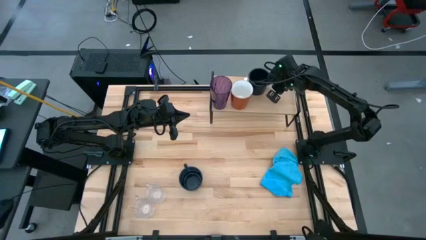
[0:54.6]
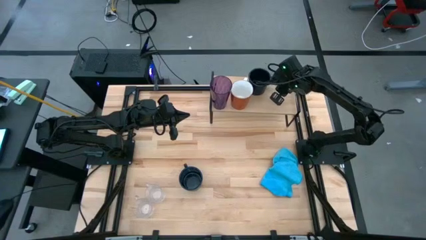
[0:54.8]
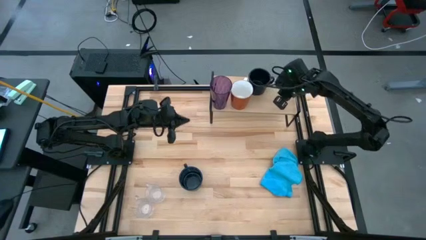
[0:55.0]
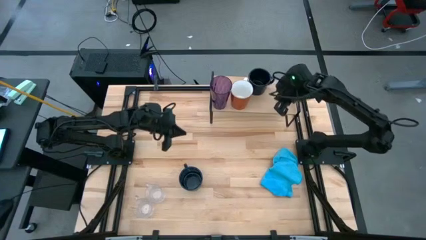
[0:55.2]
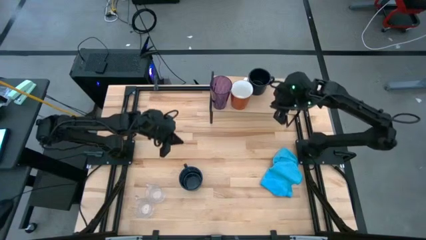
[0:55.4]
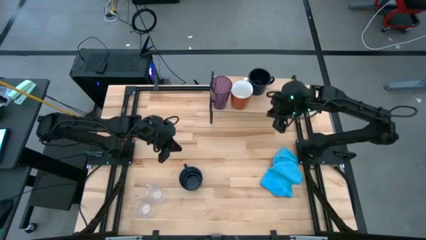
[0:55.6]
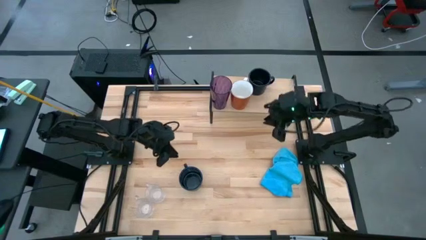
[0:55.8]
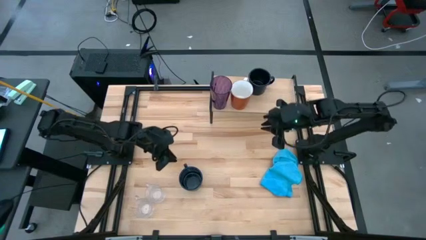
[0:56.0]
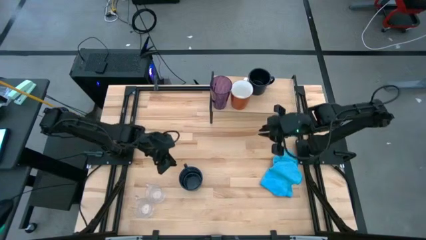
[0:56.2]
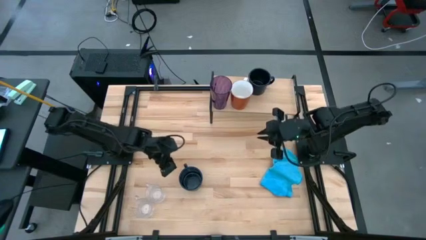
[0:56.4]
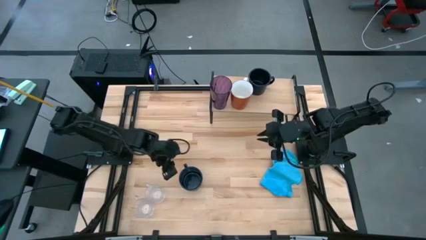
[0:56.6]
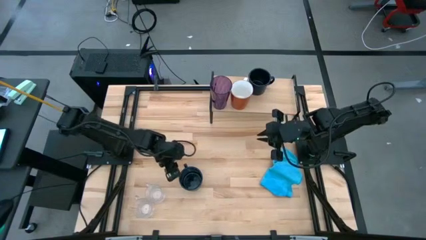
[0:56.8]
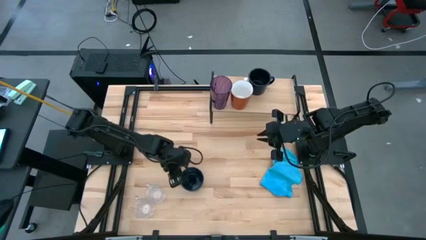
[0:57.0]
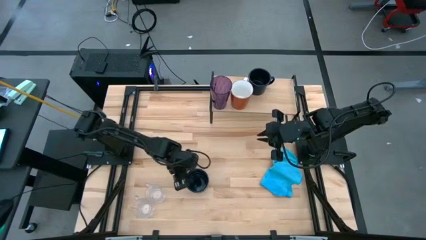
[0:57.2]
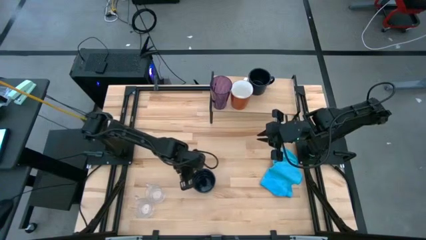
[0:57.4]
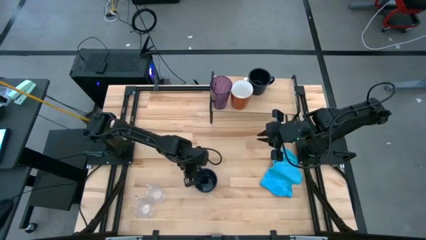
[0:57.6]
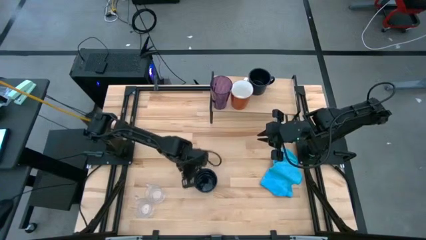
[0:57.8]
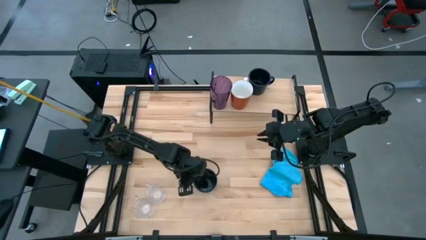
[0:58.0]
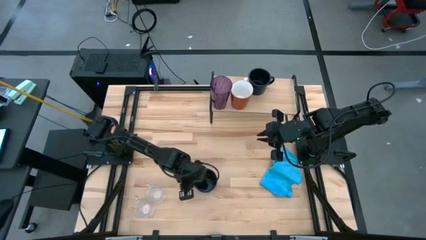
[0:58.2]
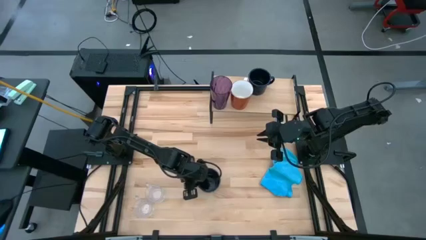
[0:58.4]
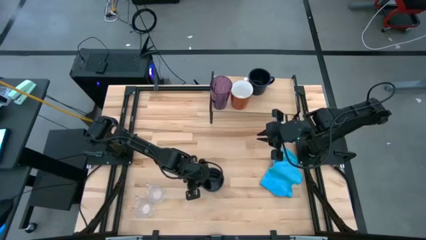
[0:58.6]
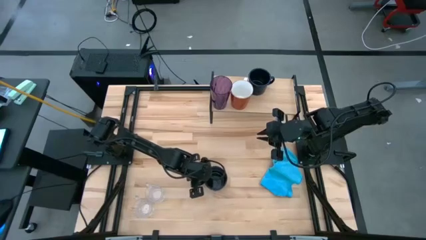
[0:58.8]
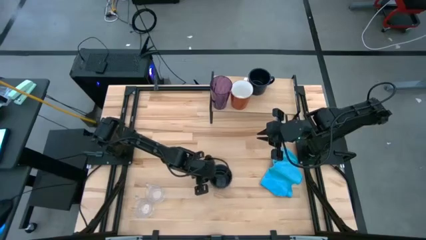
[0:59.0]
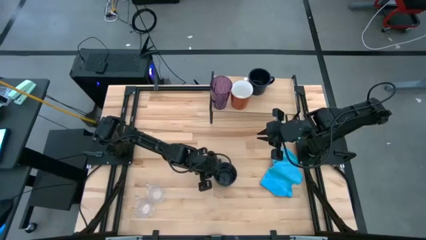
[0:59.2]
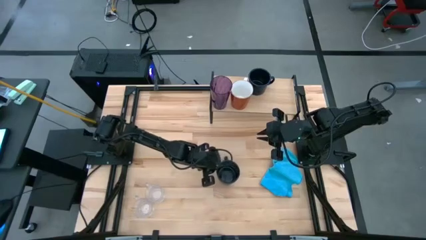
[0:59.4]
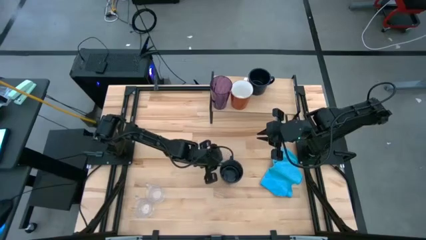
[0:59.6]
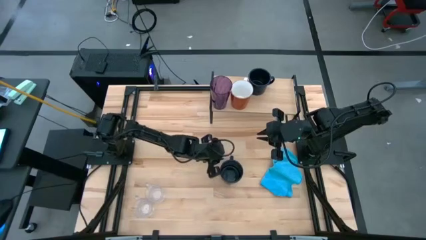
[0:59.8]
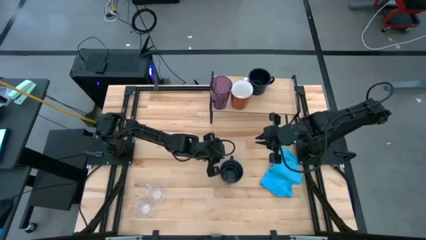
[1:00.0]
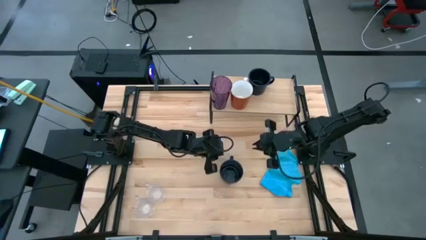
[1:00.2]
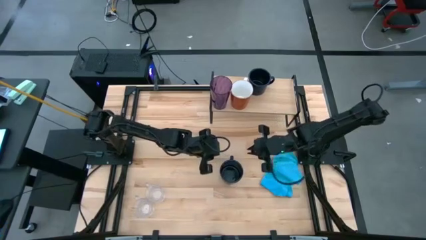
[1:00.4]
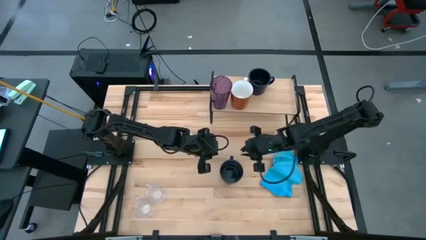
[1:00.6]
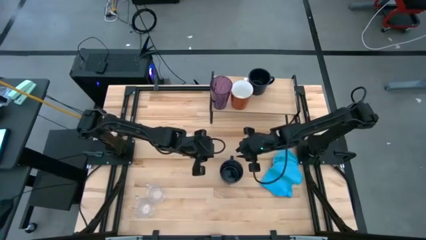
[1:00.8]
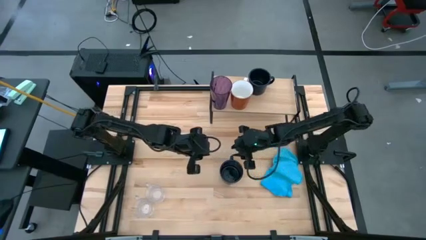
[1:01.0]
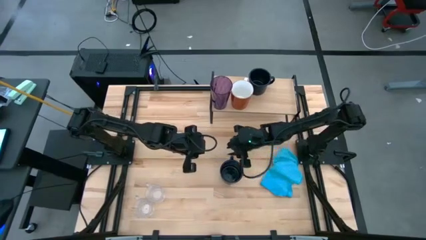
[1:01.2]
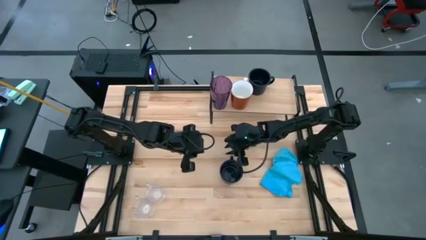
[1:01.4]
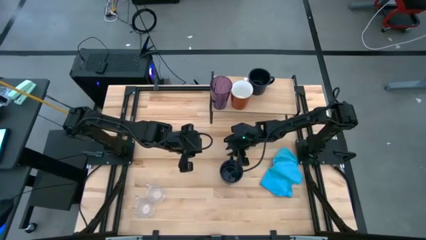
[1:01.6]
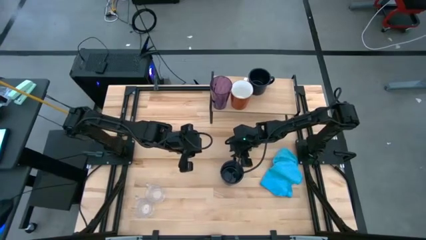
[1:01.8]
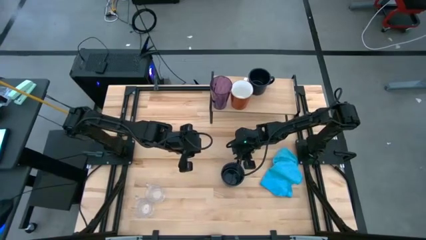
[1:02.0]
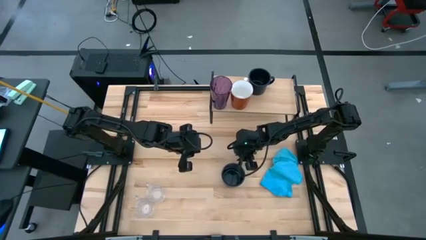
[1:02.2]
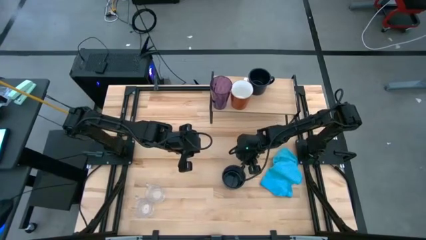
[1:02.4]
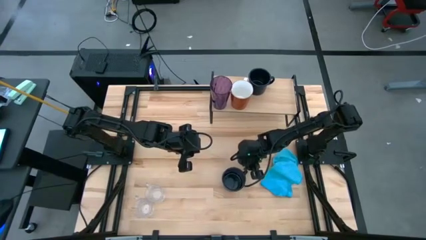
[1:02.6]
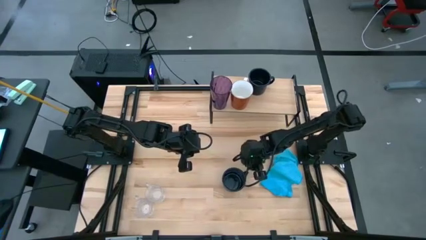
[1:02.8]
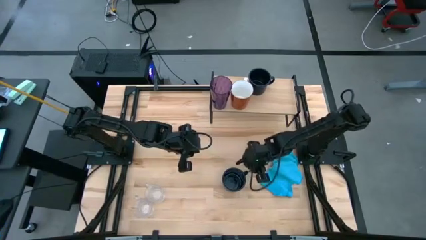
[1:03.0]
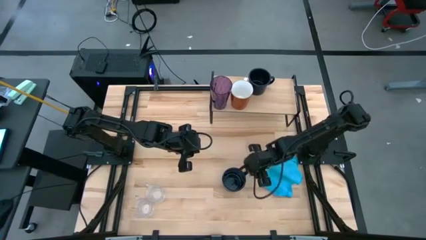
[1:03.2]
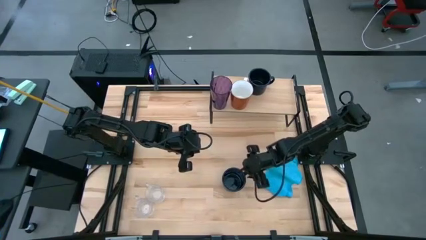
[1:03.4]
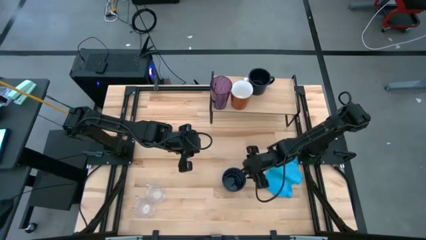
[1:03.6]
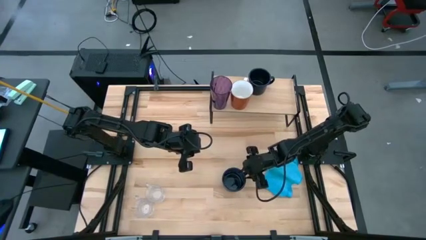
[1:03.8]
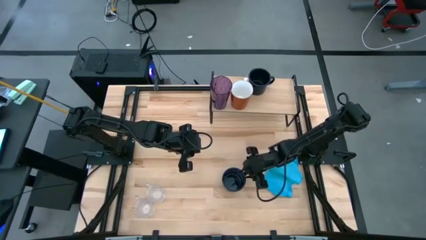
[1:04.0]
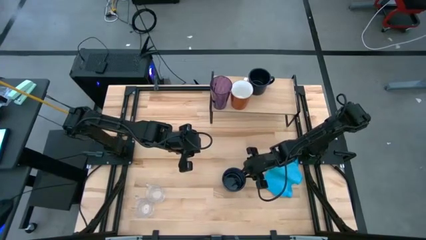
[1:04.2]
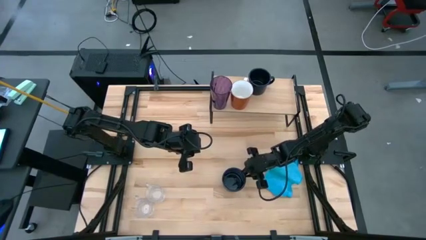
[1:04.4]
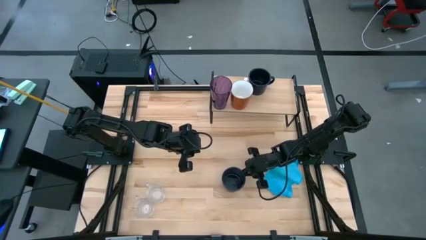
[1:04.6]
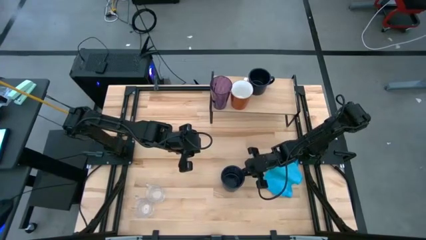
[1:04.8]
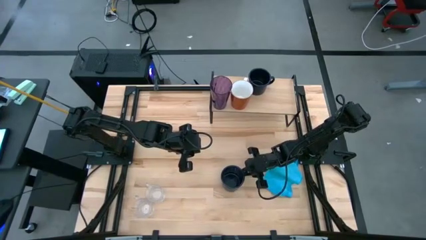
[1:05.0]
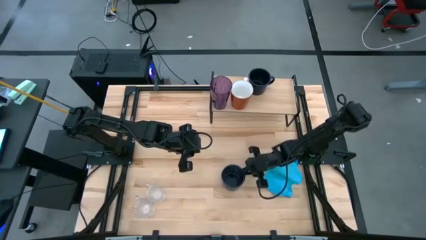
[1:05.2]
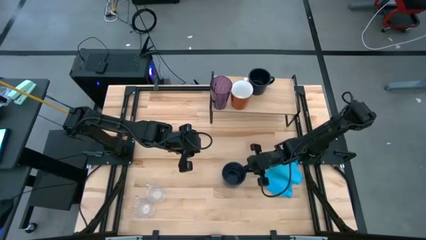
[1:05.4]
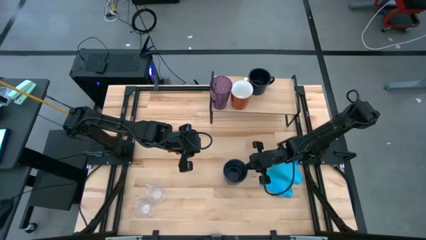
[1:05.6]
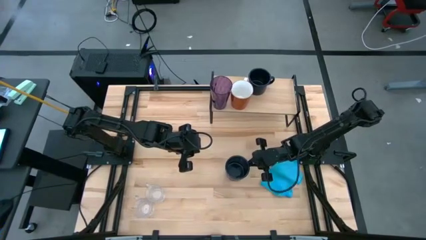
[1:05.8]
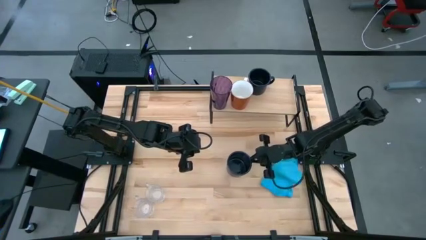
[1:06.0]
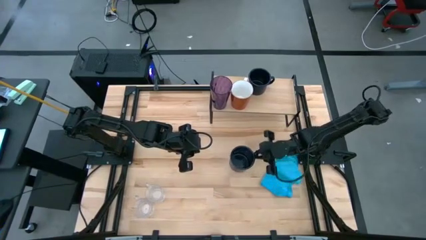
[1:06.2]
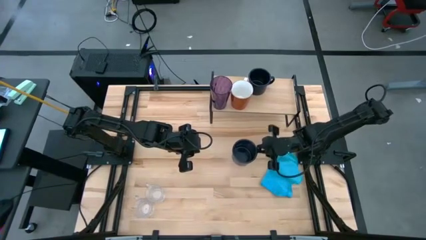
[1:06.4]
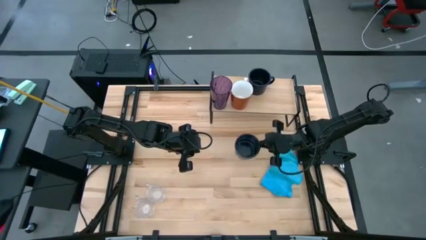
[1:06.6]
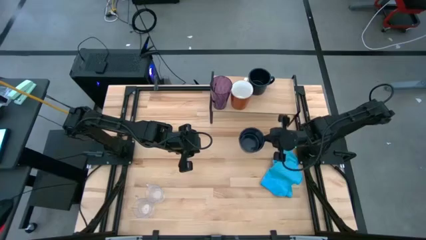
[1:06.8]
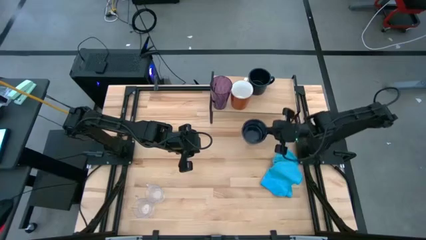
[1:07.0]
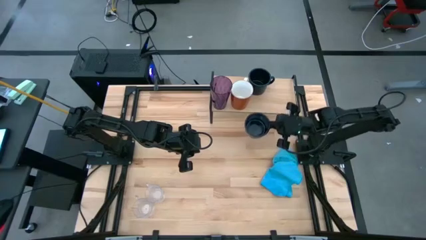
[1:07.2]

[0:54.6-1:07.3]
Task: Stack small to large cups/mugs on shelf
Put the black mug on the shelf

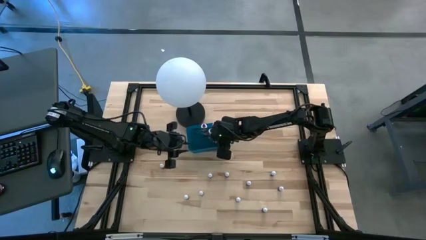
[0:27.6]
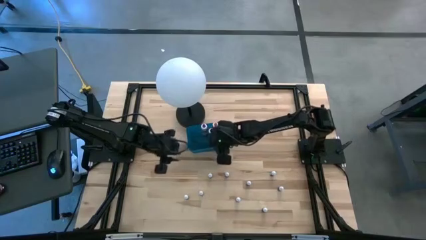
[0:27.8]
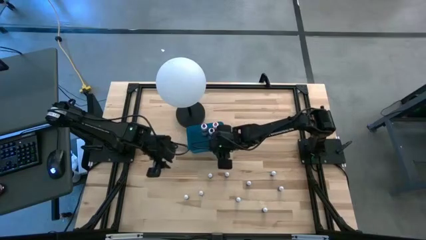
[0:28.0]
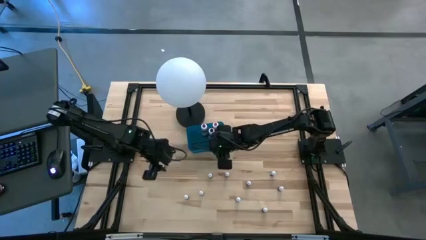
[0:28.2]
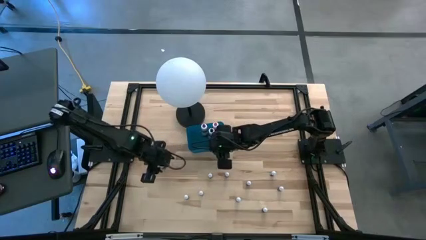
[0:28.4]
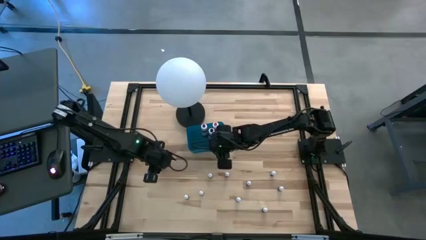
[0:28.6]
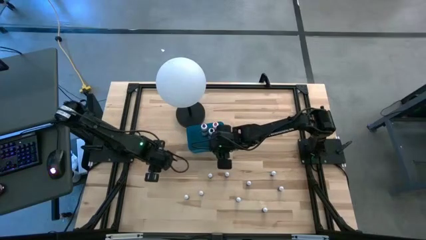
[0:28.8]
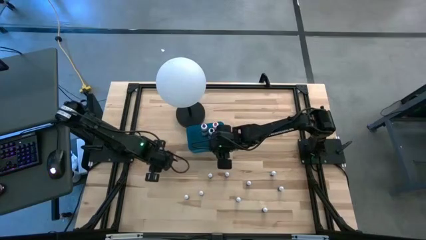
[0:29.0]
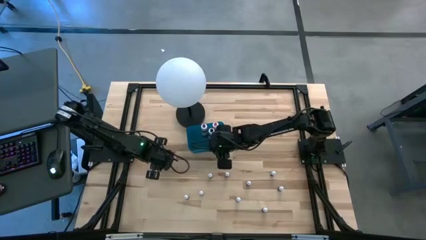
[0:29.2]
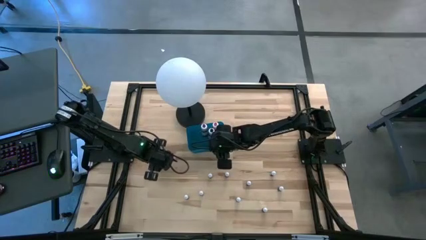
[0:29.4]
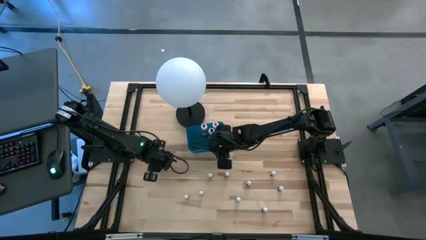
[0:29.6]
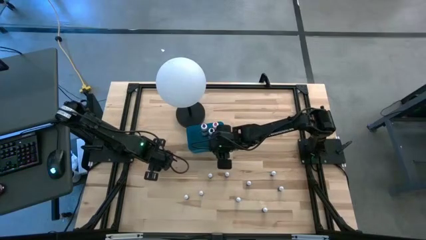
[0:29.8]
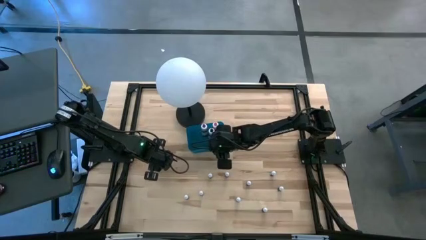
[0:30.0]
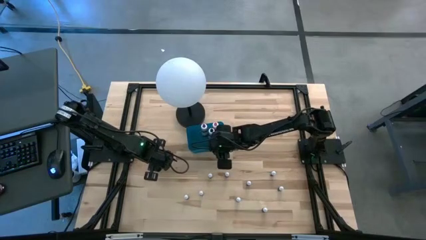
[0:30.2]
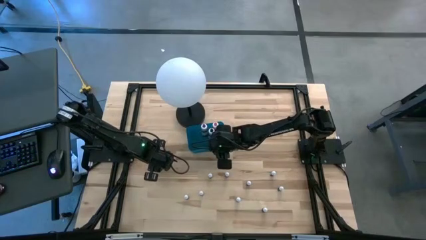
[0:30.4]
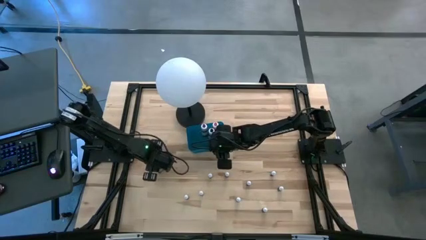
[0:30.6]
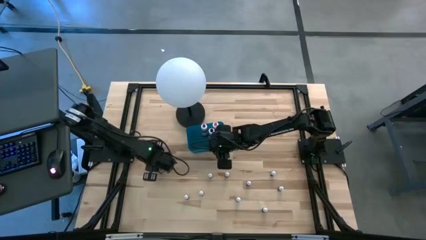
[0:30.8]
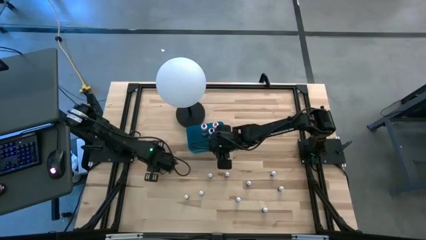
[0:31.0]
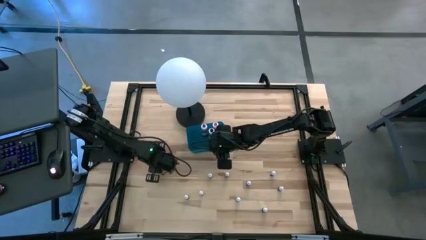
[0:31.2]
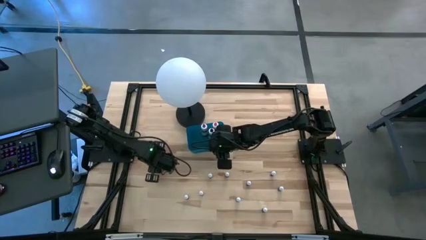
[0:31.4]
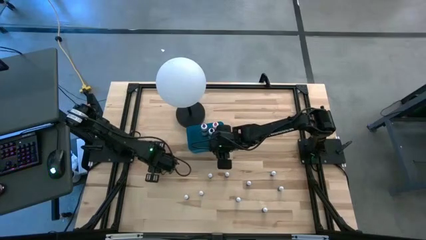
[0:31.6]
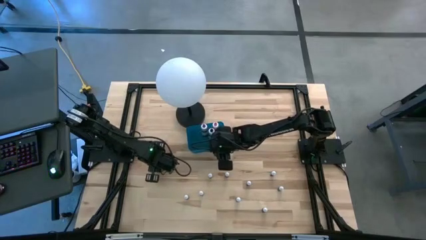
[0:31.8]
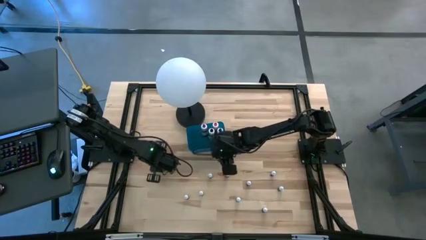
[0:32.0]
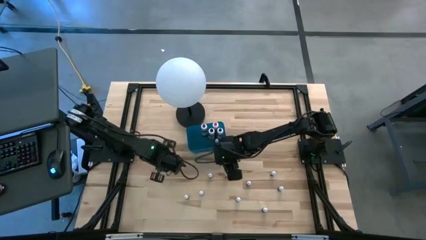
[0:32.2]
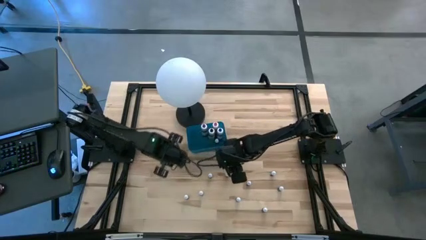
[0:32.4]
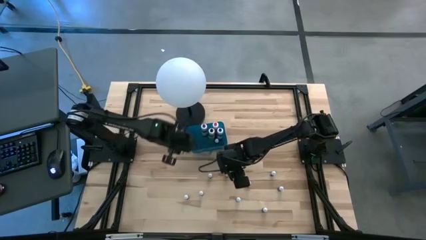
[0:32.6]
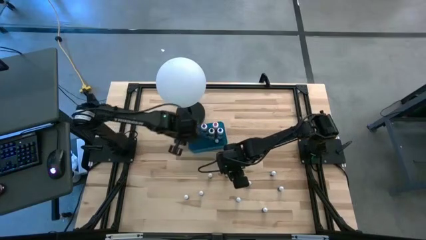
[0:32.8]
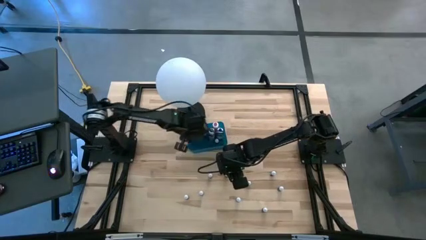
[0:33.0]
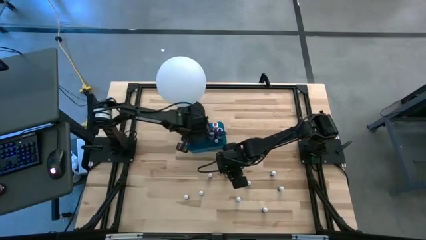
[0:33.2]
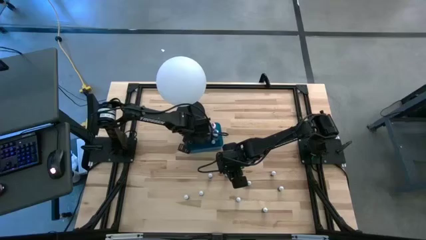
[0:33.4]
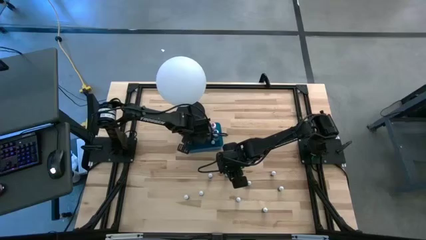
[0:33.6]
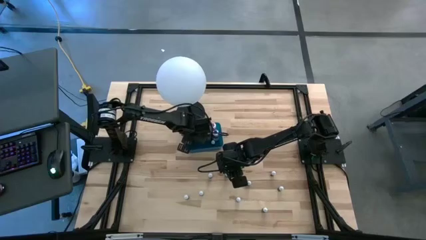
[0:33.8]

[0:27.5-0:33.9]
Task: Pick & Place food coloring
Put the small red food coloring bottle into the blue container
